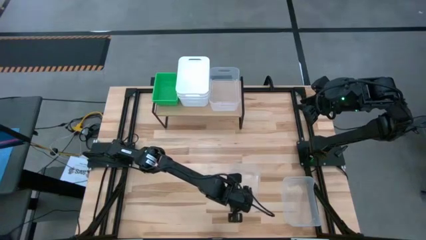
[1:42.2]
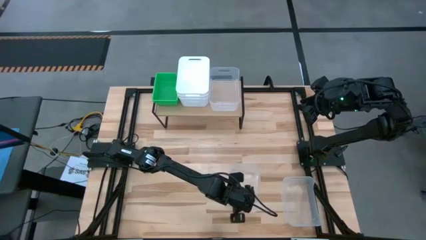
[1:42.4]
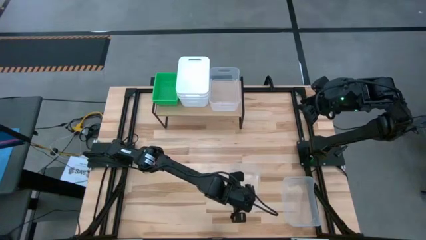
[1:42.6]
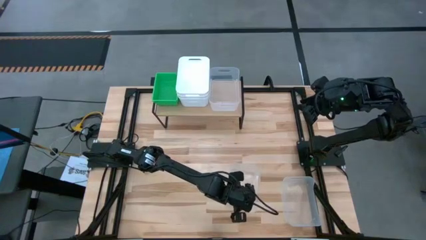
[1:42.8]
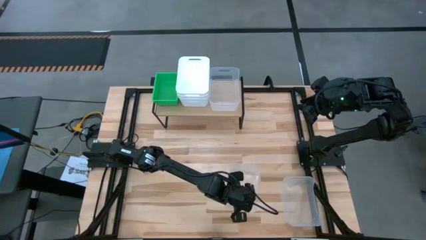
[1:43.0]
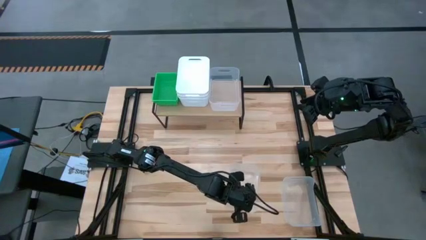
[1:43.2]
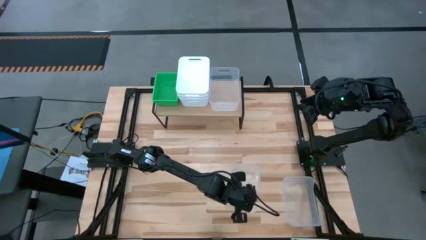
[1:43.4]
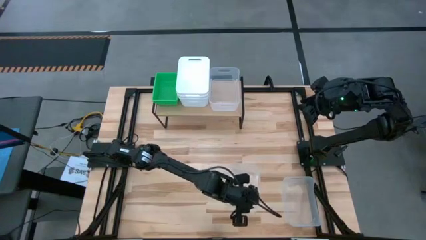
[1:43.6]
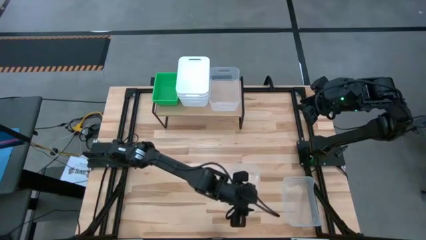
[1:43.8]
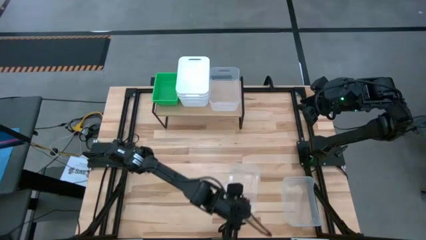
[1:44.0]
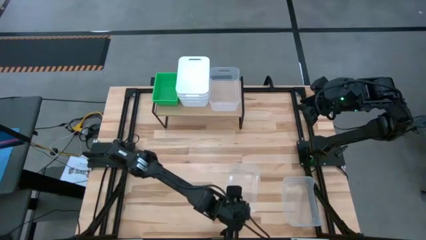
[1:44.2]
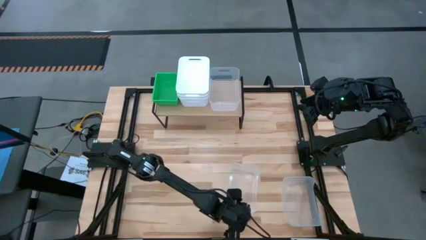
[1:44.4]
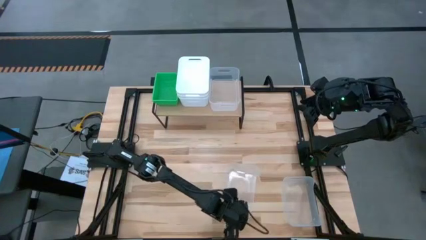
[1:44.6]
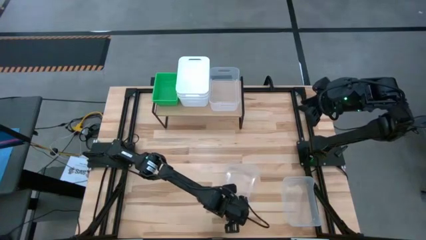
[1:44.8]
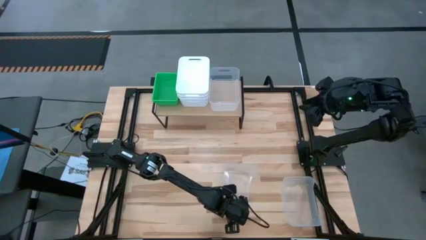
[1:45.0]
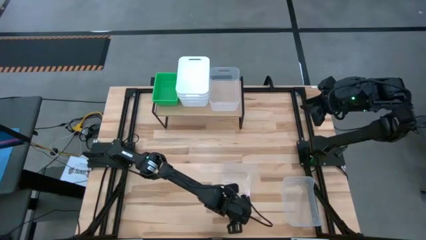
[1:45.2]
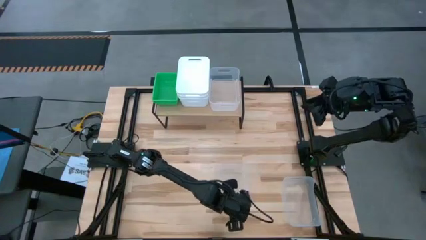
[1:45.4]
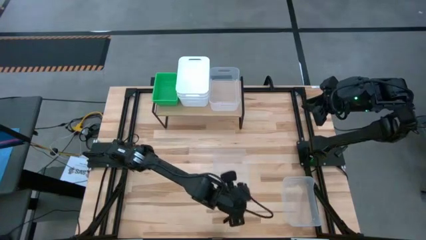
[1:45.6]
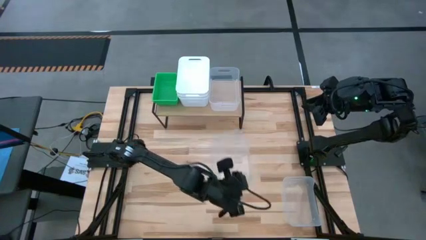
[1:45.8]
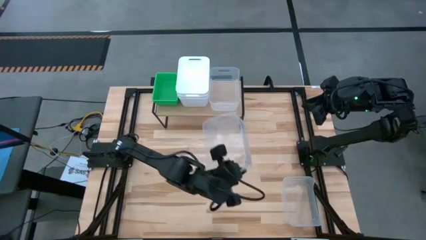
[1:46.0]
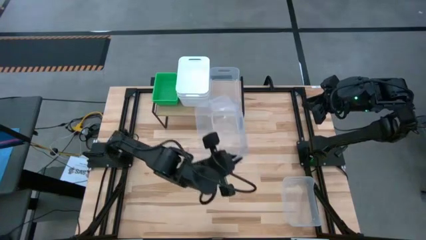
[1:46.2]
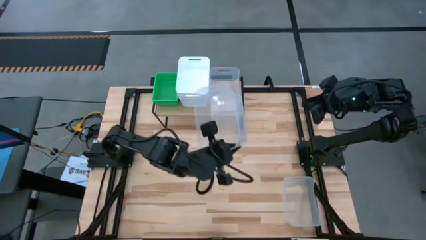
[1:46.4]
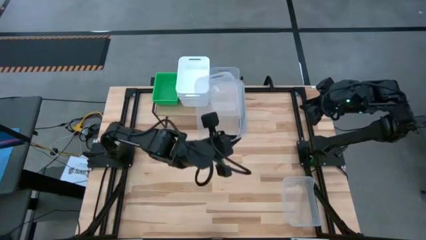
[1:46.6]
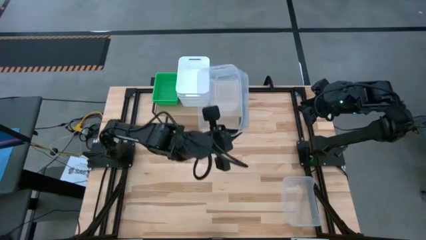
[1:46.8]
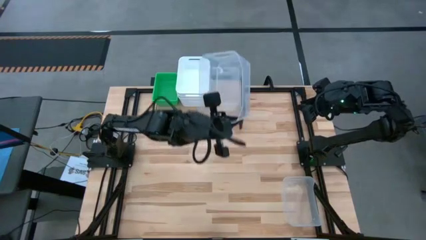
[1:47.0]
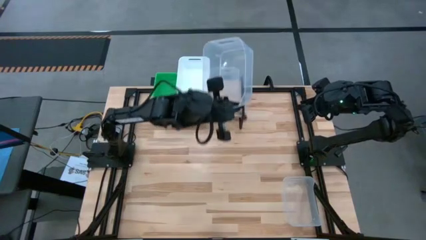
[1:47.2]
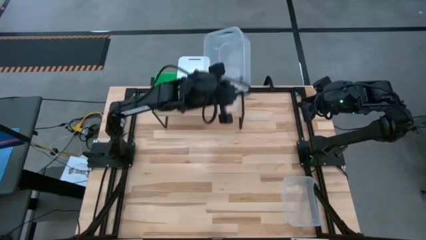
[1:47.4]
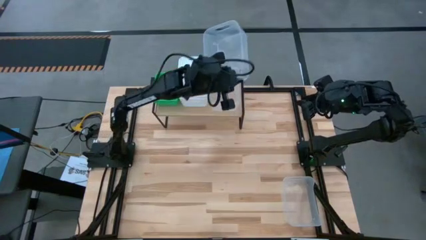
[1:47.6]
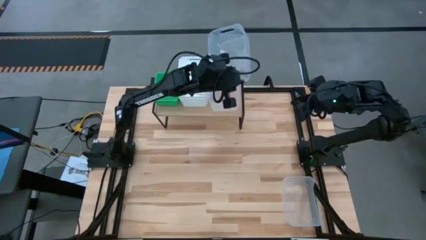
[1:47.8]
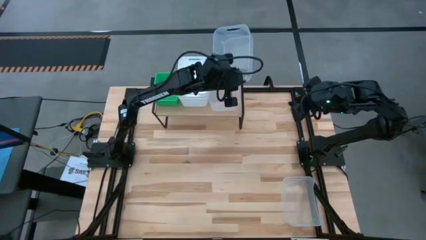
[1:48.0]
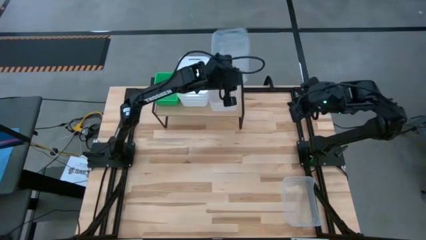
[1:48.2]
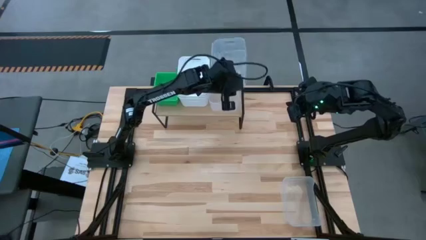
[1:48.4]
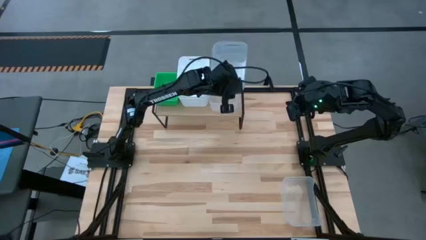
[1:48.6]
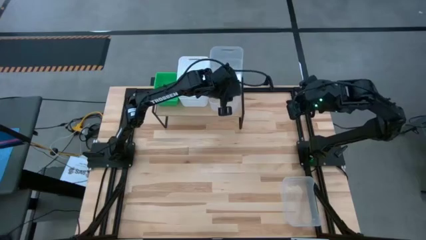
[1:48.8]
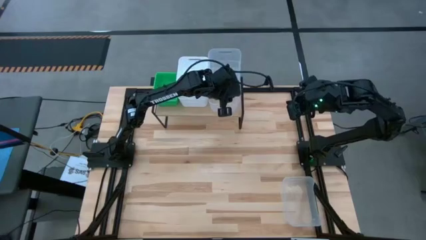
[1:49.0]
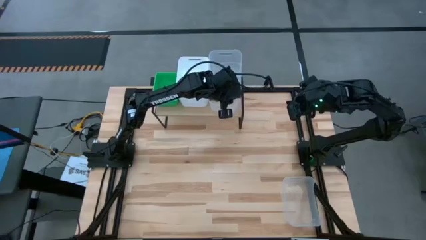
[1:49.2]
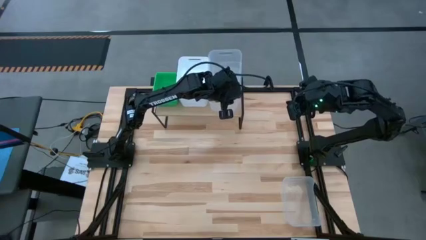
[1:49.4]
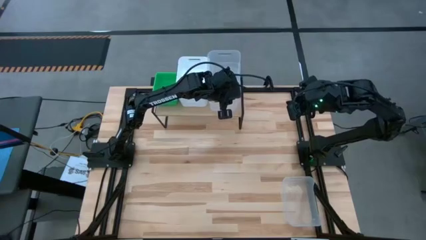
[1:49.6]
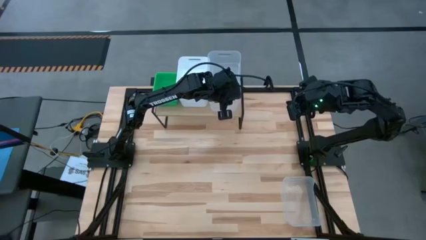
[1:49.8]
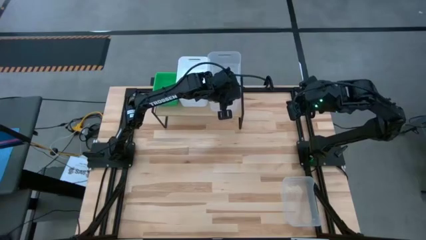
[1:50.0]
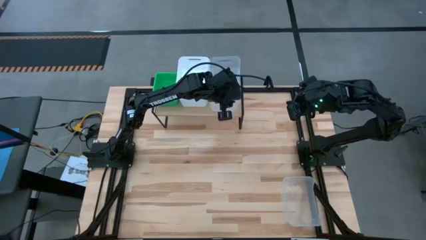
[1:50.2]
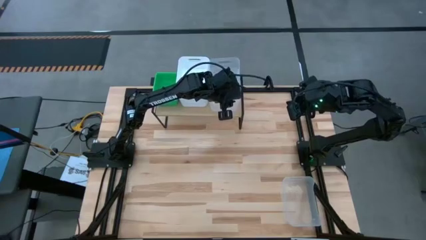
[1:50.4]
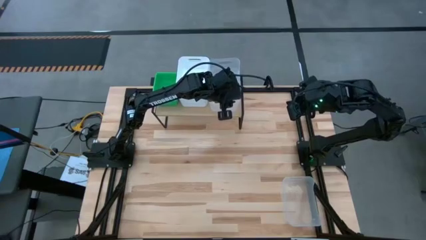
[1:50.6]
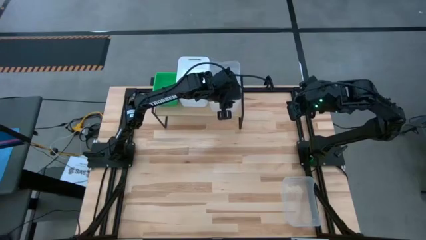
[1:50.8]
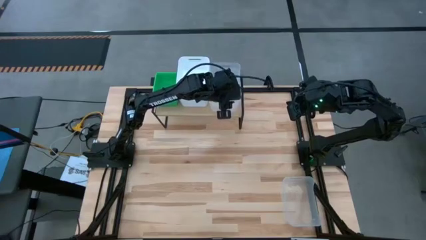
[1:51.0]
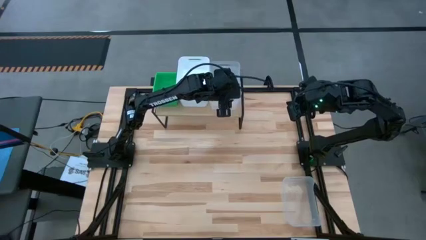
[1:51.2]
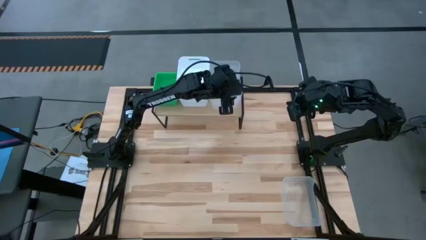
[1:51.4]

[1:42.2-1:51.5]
Task: Stack baskets on shelf by color
Stack the left transparent bin on top of the transparent bin on the shelf

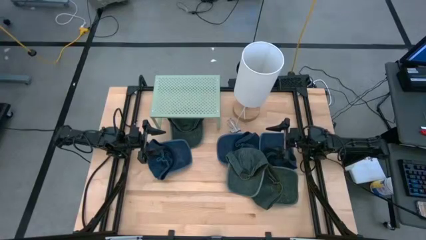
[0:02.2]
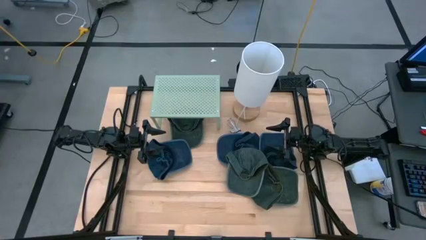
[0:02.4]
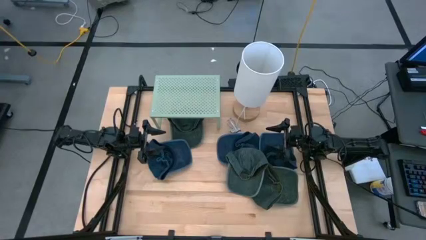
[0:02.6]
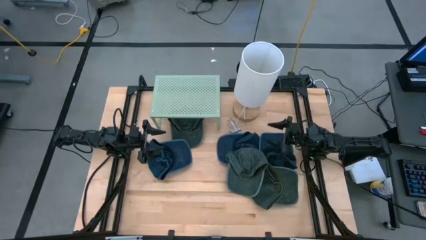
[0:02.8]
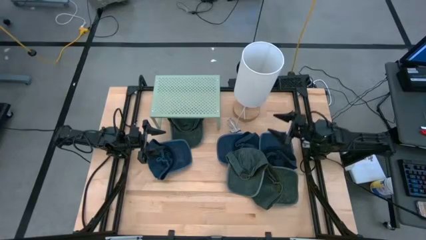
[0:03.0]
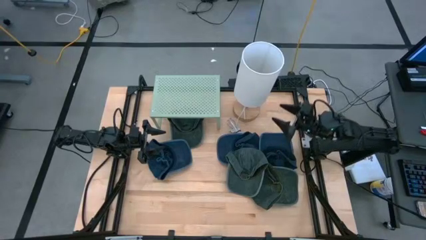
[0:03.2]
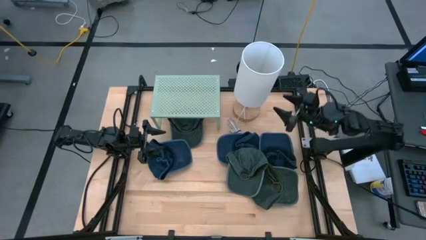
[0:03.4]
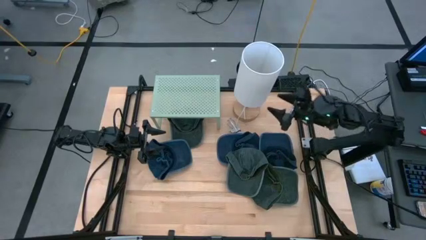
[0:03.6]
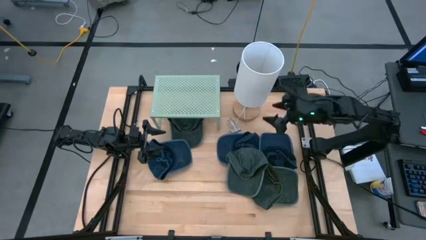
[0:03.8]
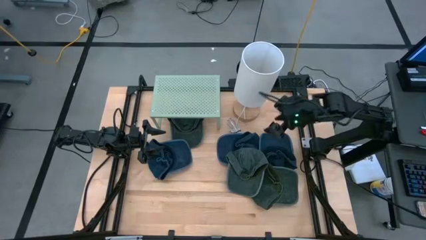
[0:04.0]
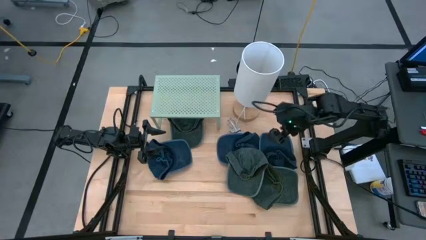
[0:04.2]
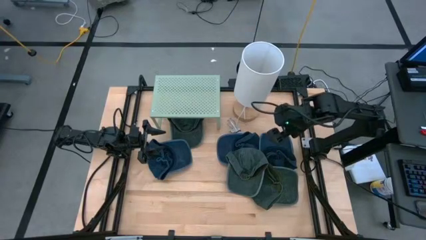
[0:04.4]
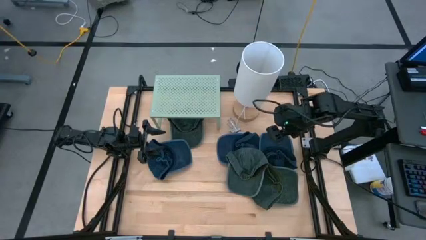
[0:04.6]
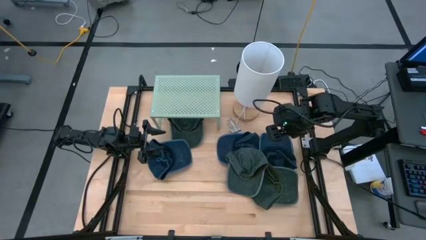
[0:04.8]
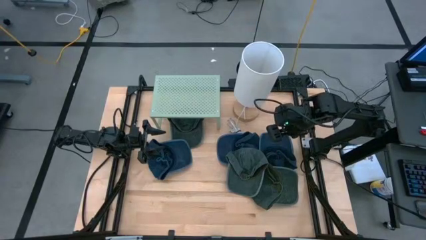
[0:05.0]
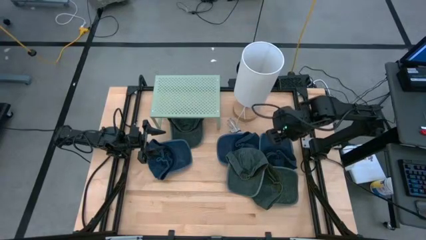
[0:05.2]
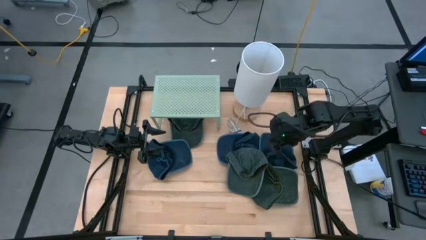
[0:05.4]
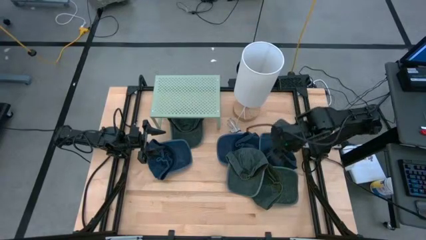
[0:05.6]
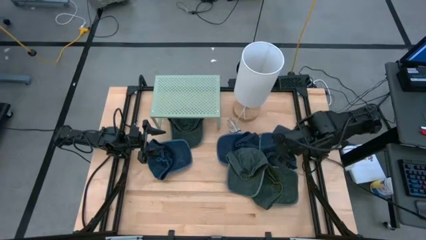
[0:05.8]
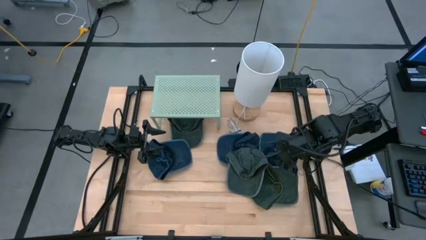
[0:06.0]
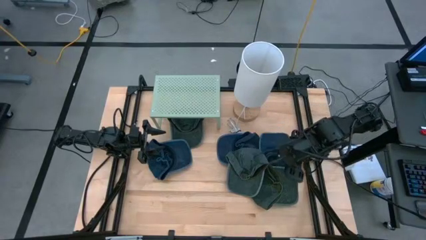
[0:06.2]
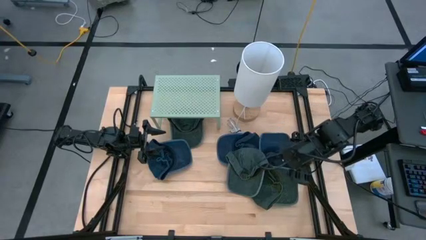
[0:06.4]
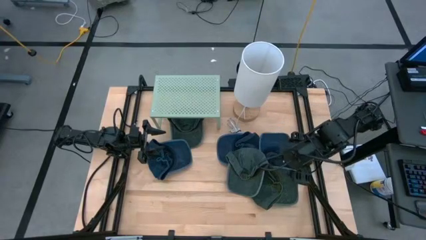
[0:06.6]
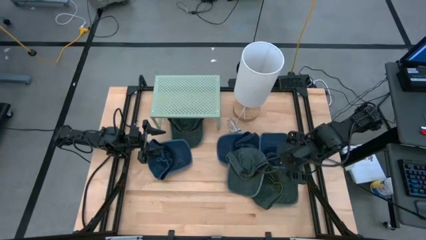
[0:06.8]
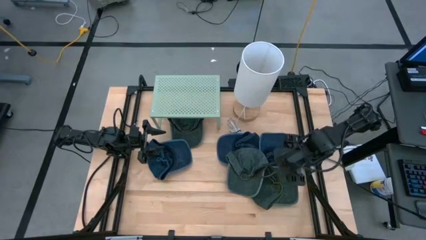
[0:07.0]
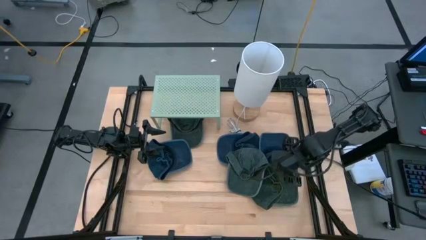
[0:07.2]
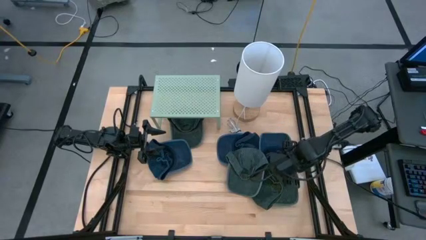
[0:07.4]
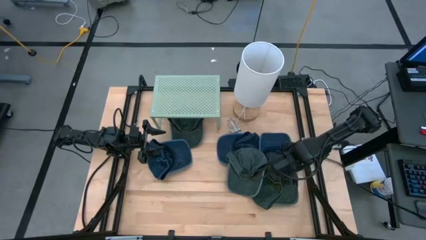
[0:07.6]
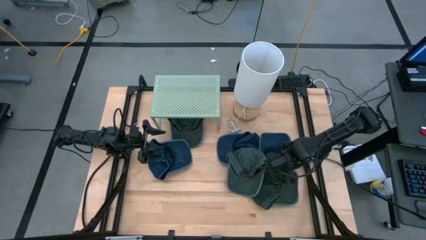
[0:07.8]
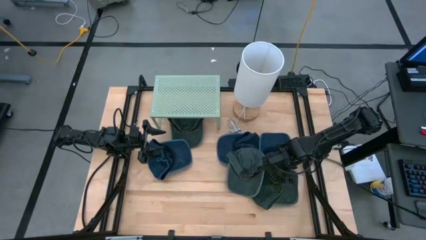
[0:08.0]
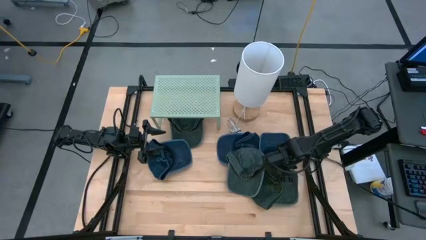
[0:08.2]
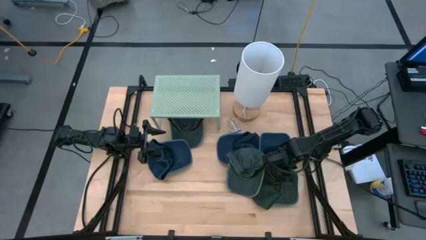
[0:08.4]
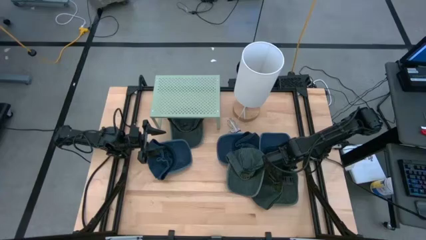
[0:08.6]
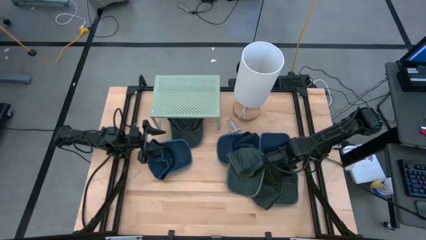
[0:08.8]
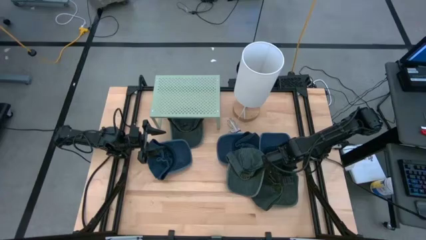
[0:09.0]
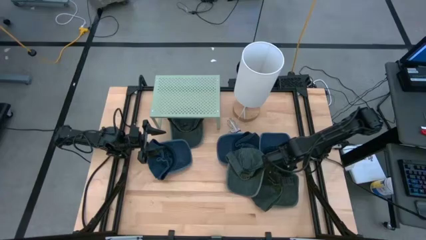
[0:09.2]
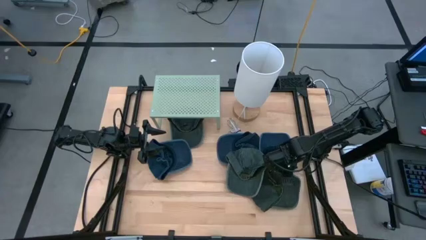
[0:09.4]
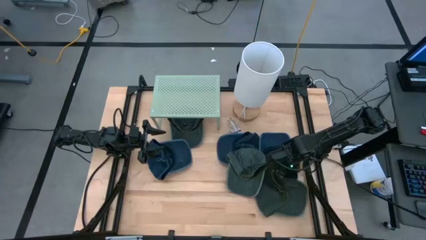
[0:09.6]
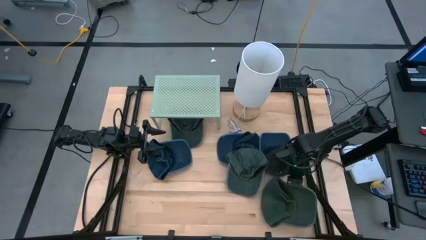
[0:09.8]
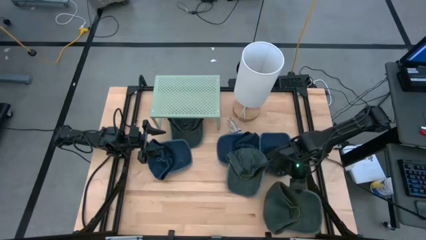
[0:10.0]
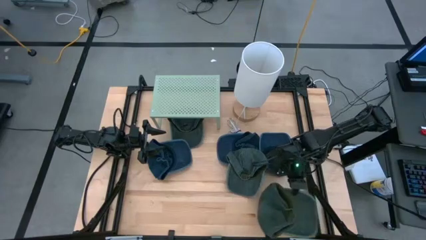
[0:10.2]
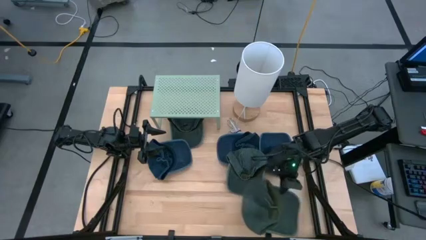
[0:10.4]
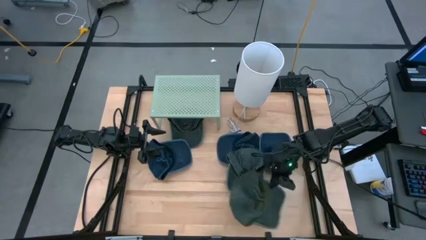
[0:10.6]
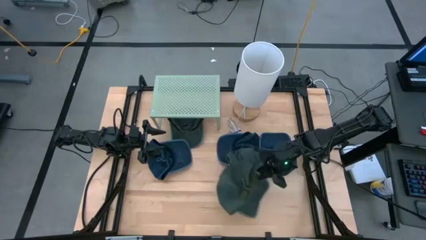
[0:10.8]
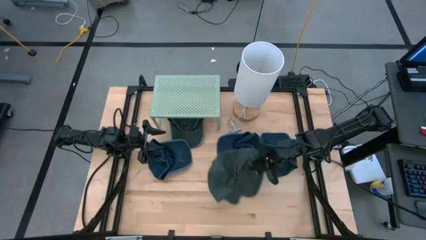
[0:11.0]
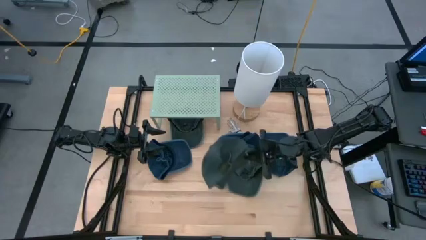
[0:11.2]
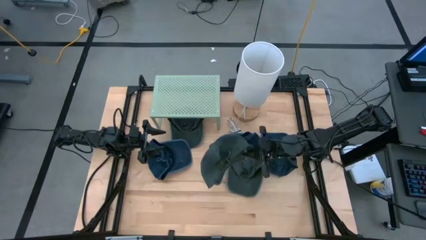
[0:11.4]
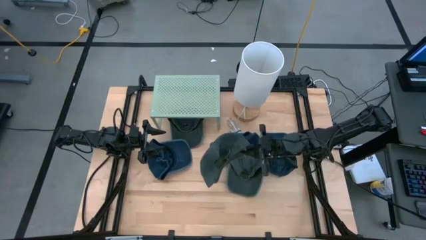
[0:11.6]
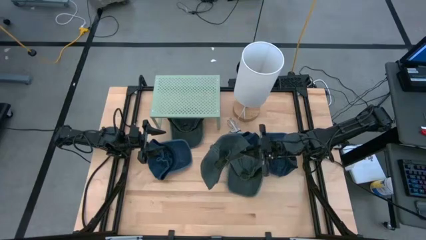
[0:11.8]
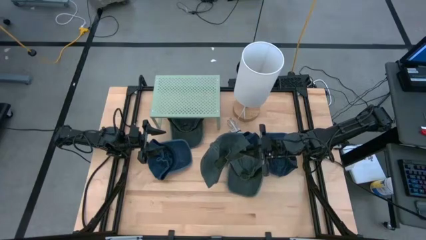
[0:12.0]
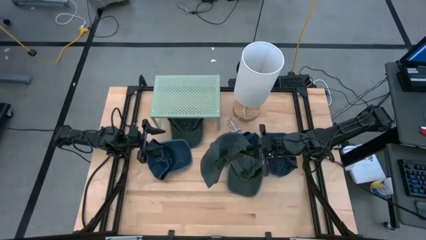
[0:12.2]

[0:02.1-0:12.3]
Task: Pick & Place hat
Put the right gray cap on the shelf
